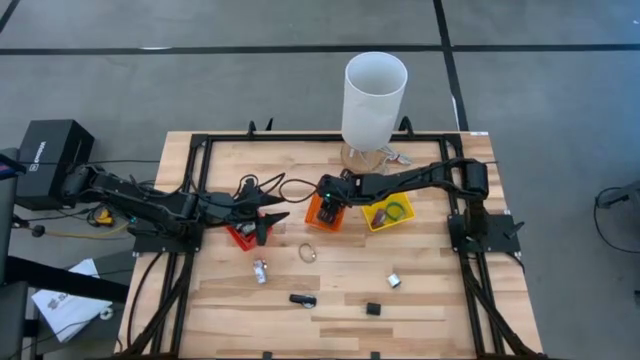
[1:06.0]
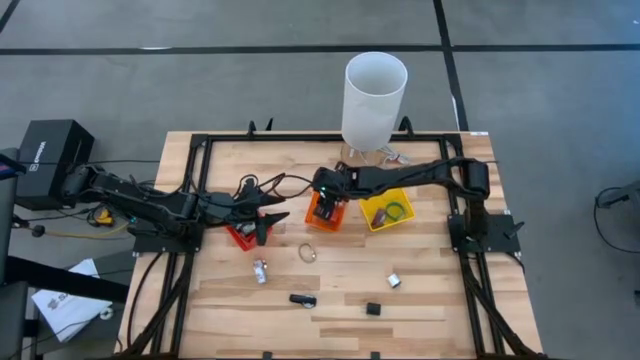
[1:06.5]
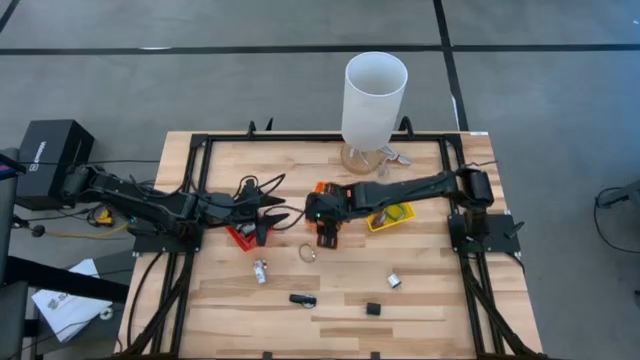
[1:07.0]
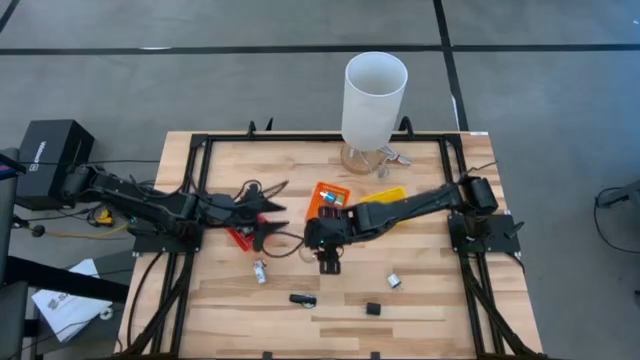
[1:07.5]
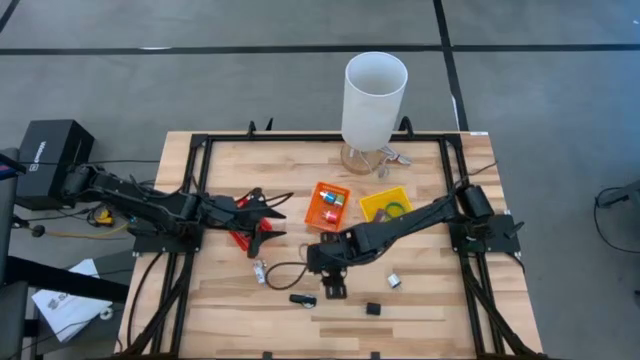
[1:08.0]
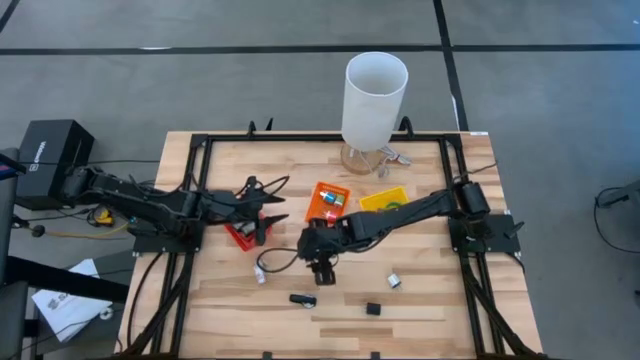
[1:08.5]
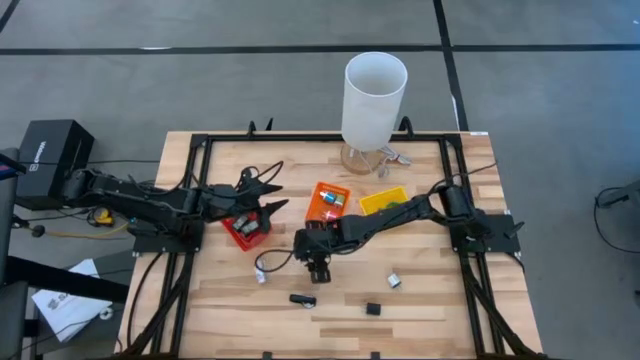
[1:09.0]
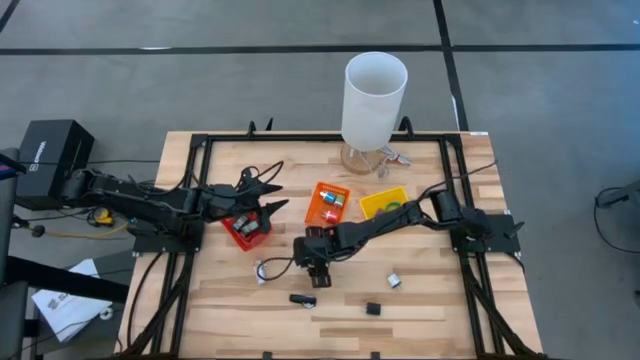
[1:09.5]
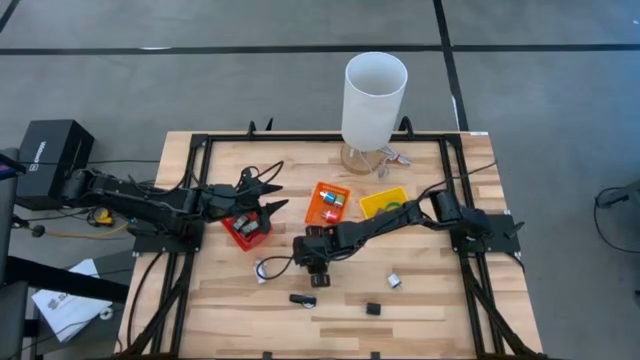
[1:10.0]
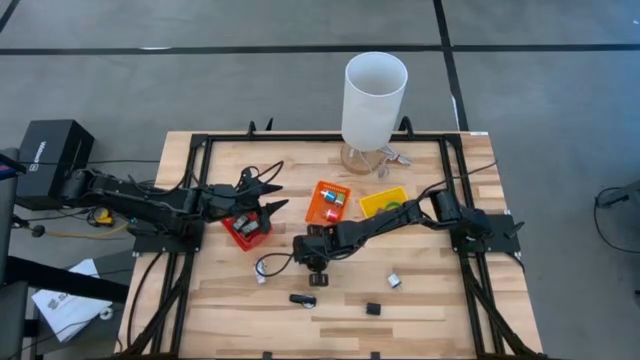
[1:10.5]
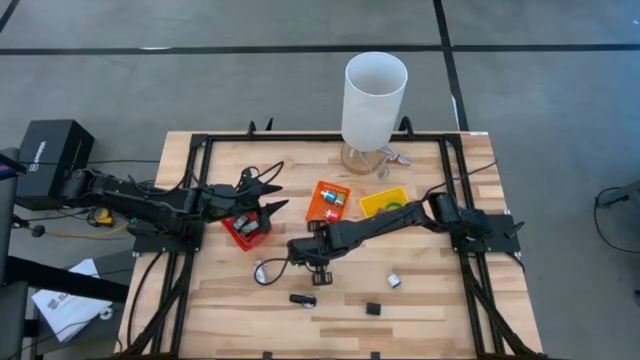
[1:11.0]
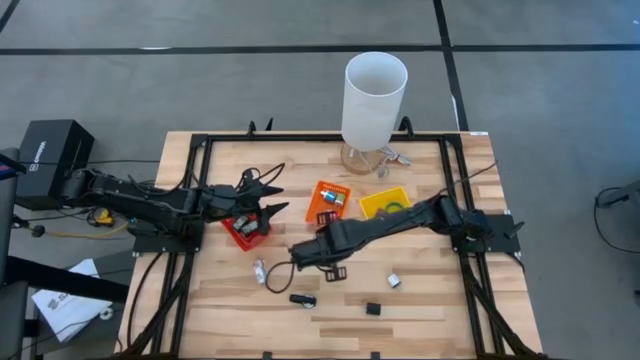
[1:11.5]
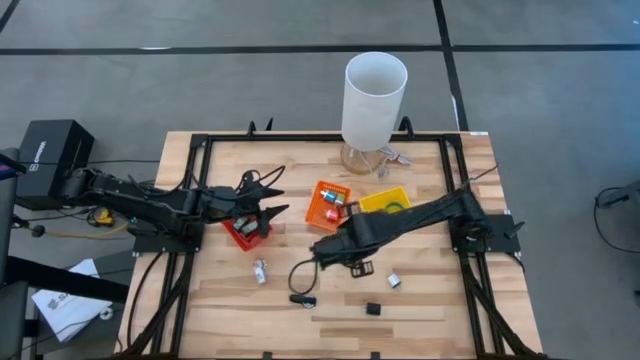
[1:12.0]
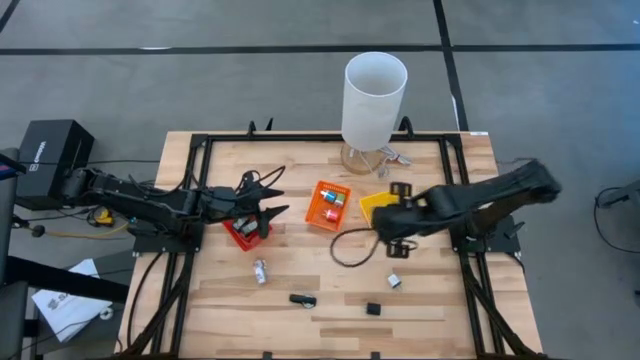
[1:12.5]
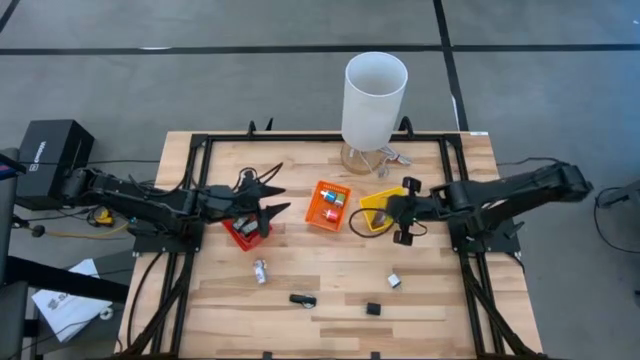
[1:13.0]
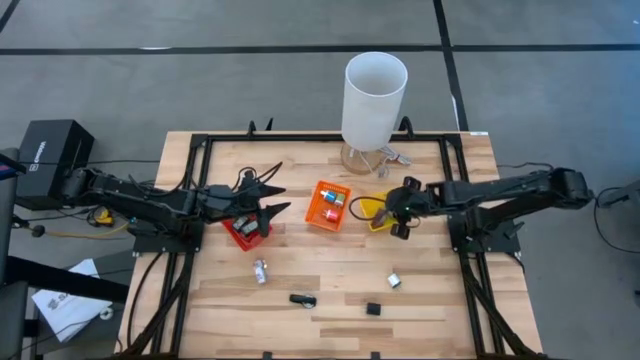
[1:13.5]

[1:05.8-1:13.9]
Task: Pick & Place Office items
Put the gold wrist watch into the yellow bin

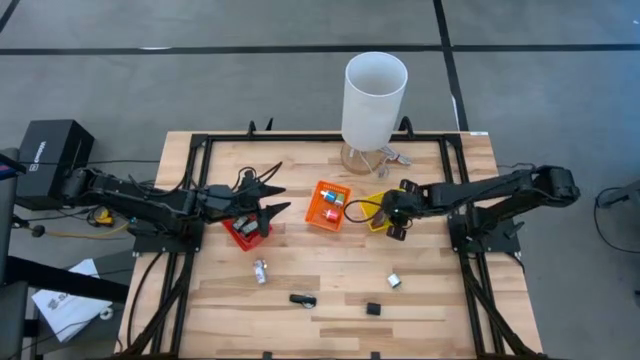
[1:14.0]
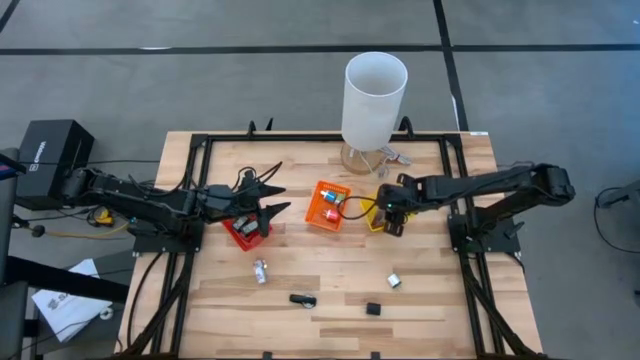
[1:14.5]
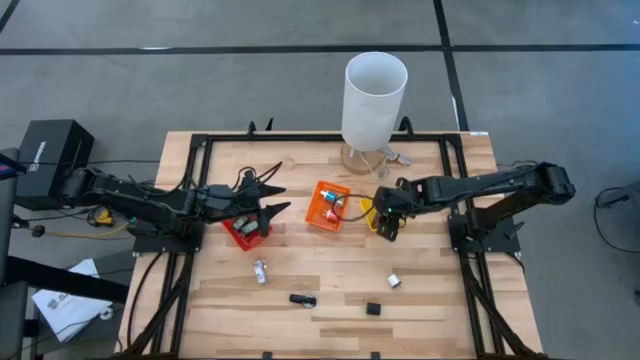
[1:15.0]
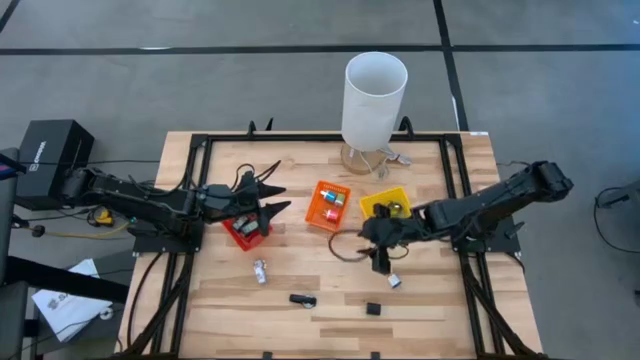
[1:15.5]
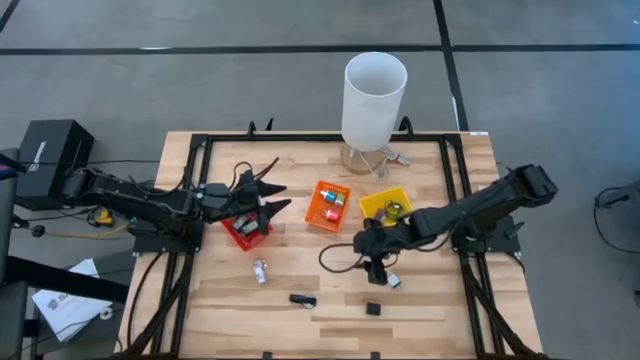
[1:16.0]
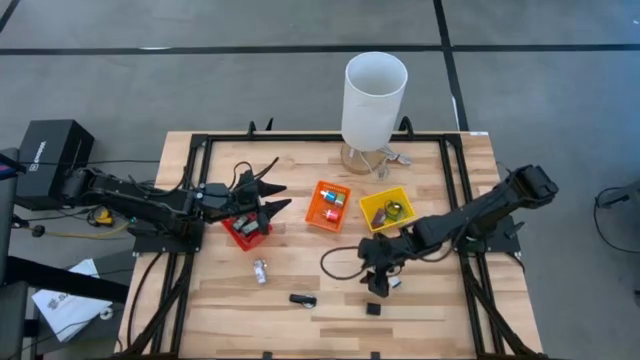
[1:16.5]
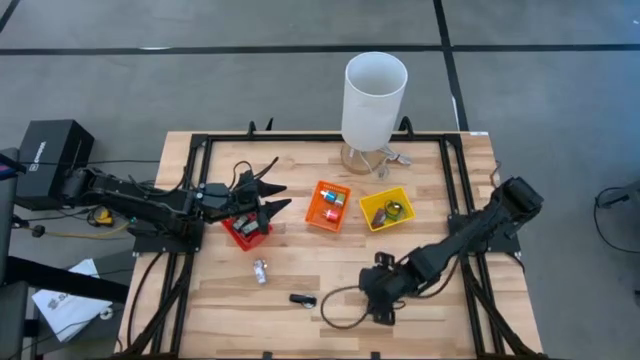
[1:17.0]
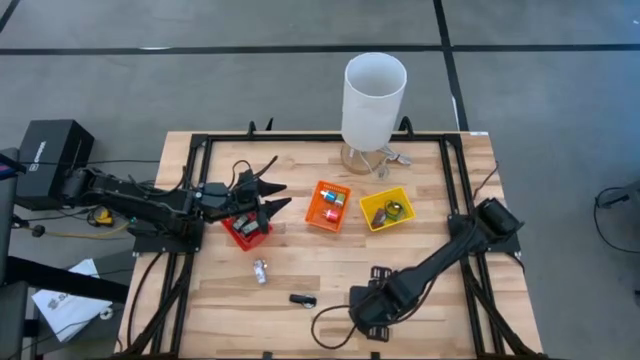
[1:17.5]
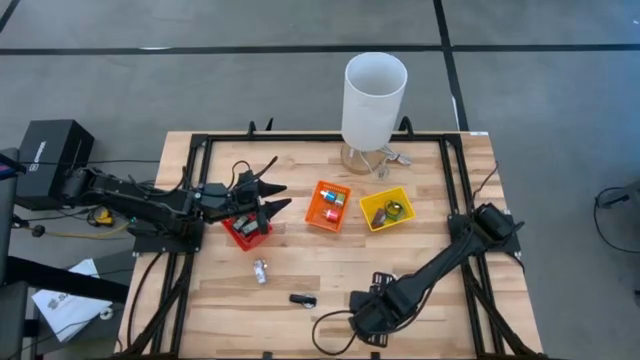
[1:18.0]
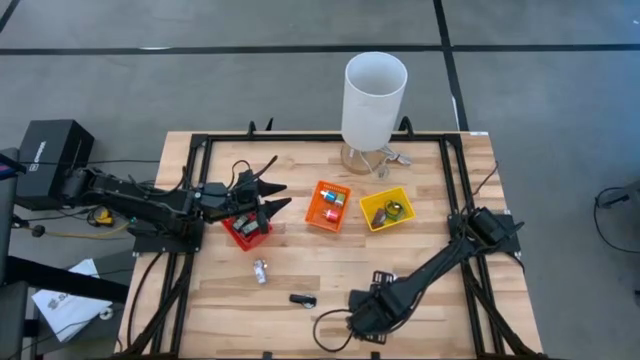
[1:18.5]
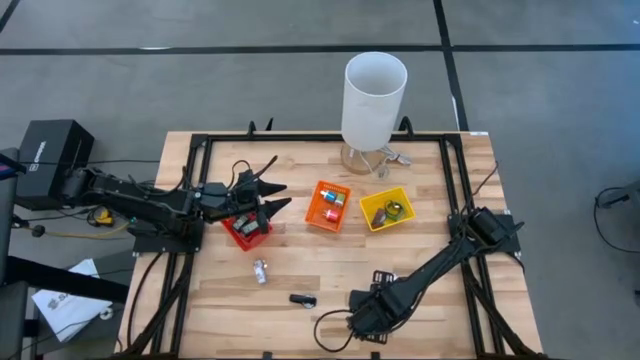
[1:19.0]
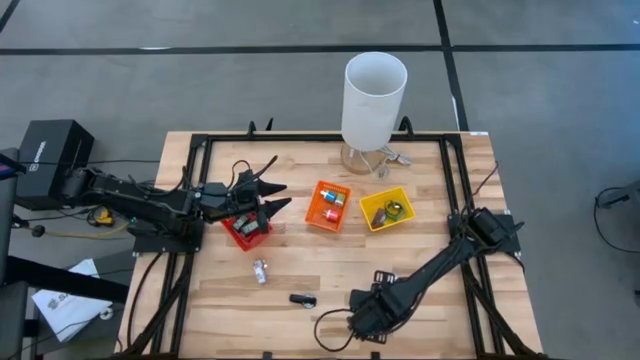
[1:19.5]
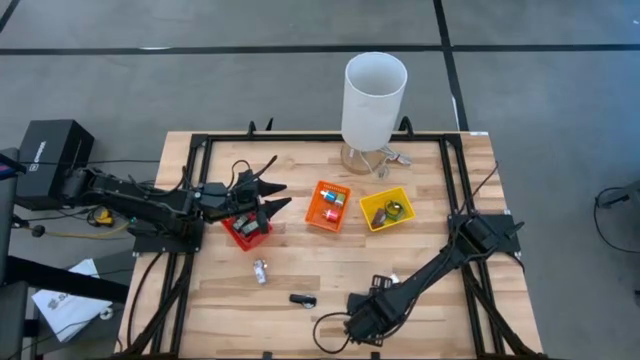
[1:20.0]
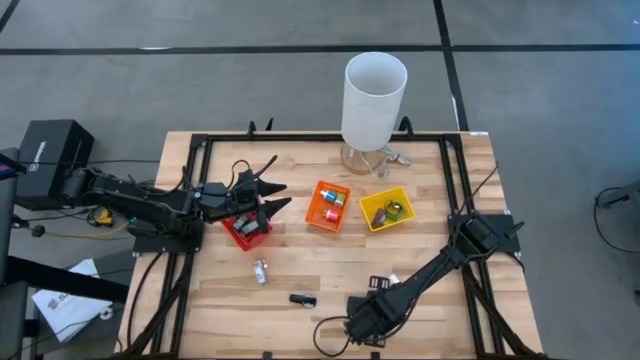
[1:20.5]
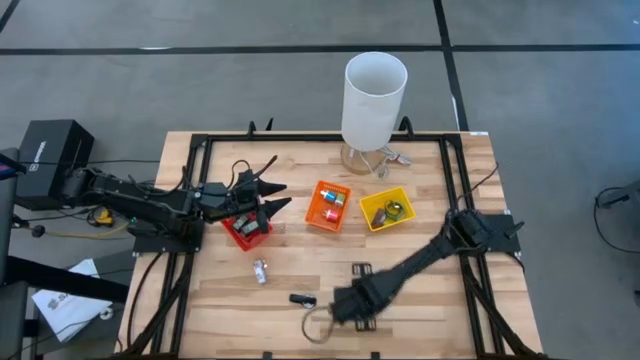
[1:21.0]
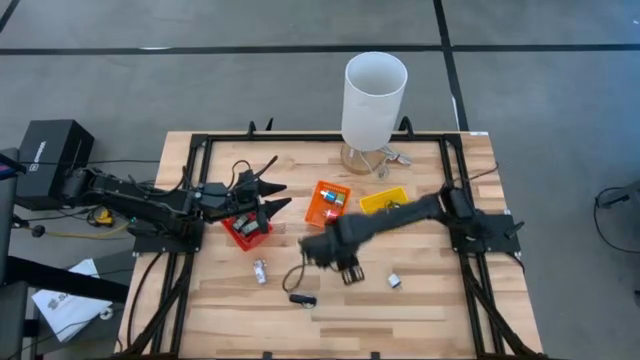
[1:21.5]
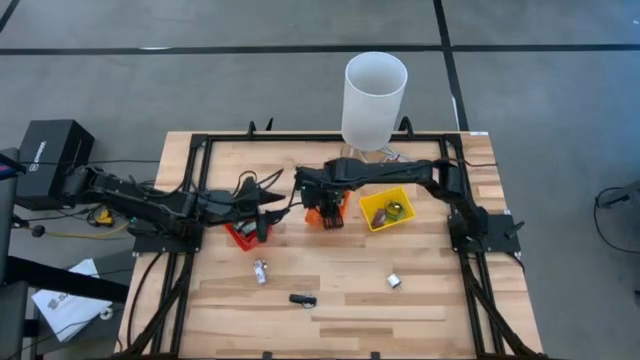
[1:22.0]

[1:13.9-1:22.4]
Put the black charger adapter into the orange bin

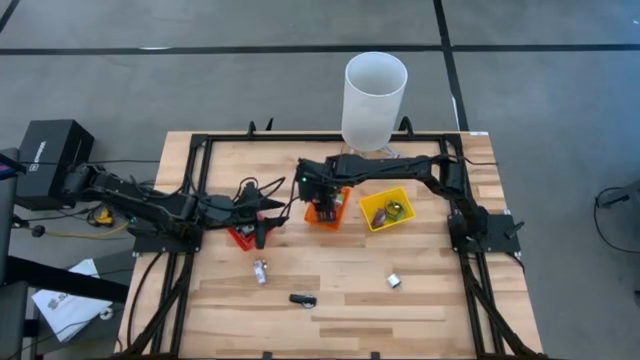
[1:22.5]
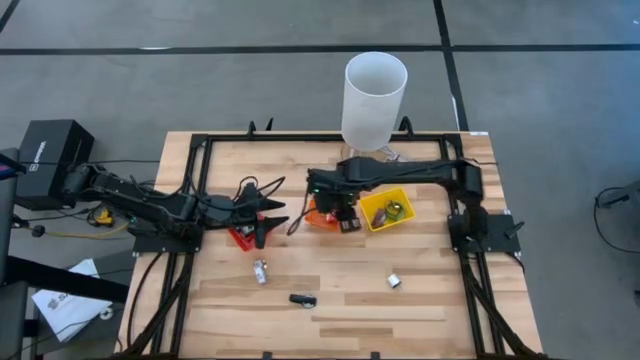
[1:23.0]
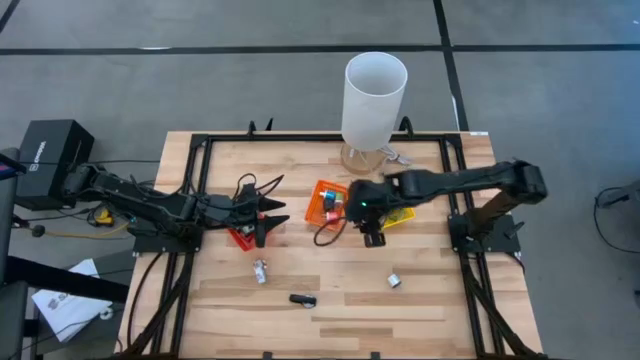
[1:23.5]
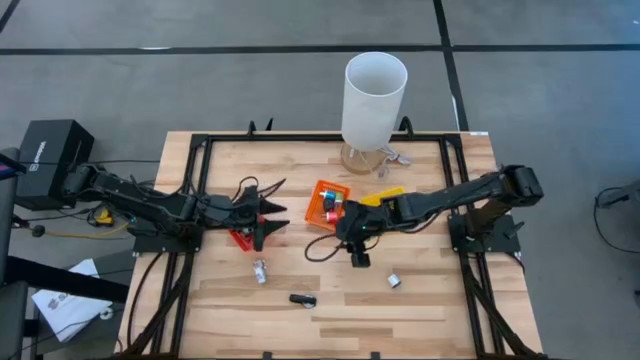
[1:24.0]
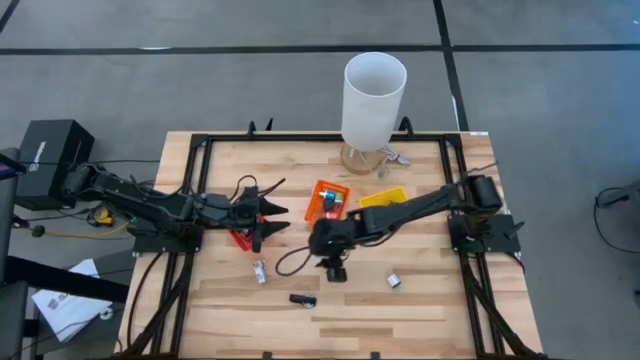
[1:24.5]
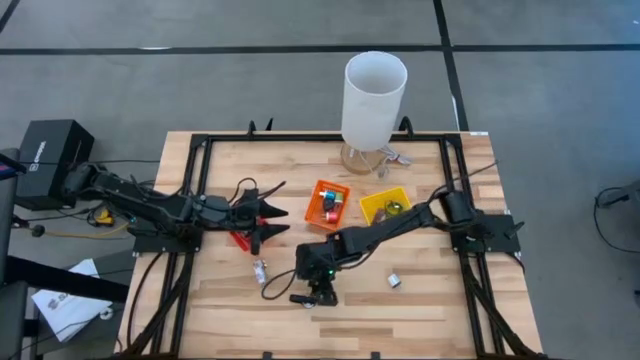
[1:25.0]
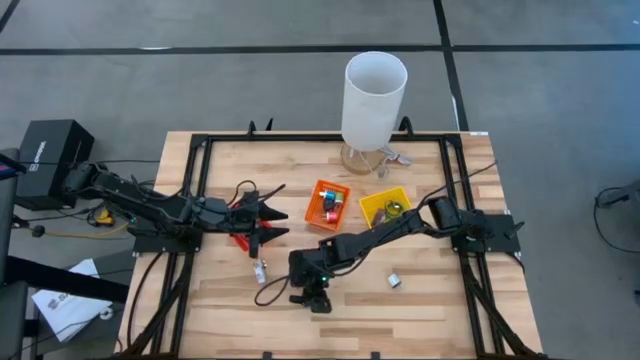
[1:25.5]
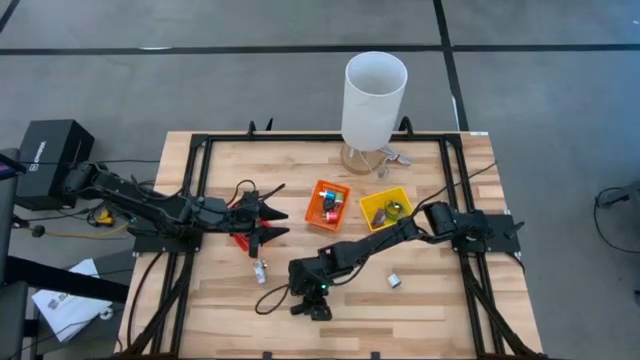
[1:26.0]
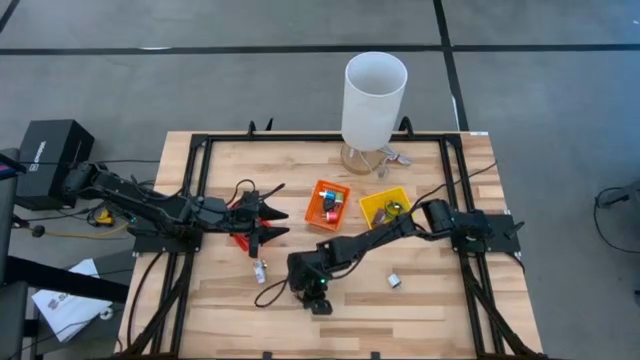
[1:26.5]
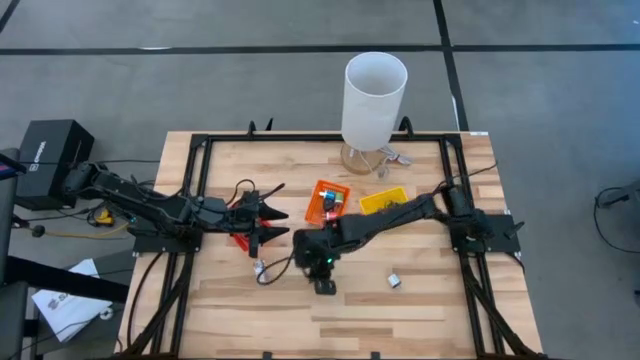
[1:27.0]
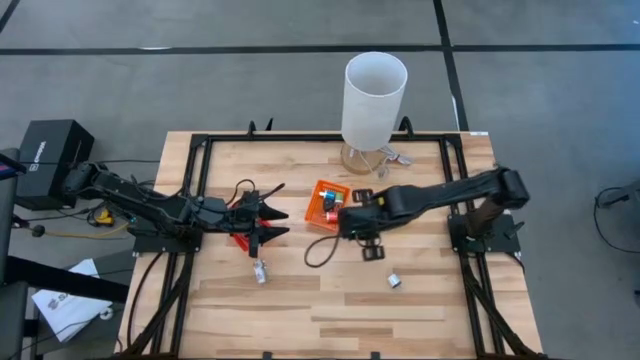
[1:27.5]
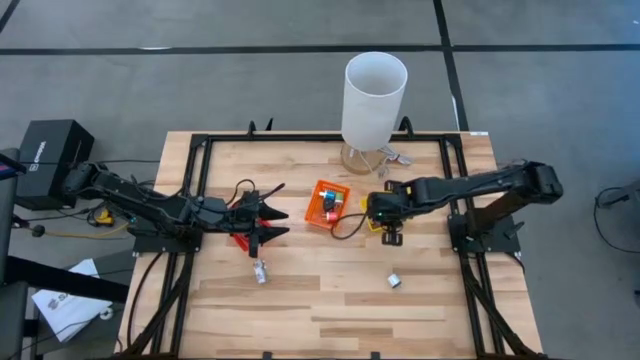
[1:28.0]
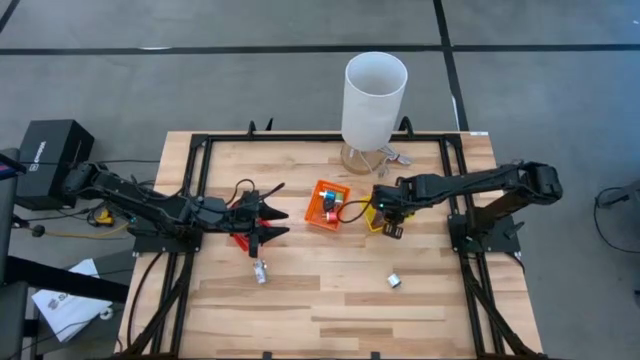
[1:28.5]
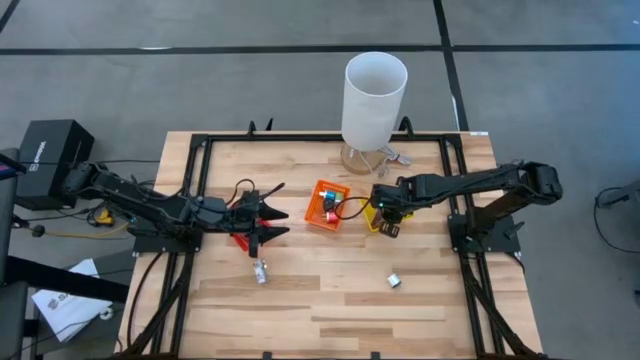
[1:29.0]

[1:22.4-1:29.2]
Put the black wrist watch into the yellow bin
